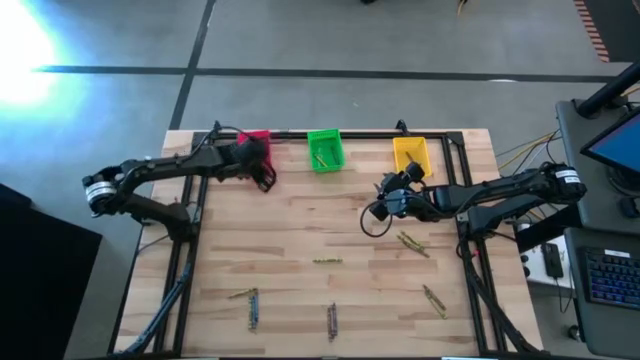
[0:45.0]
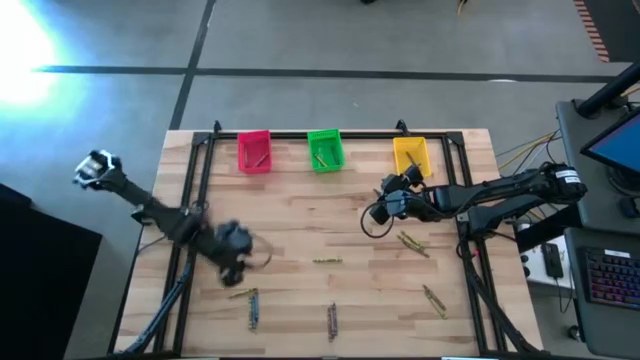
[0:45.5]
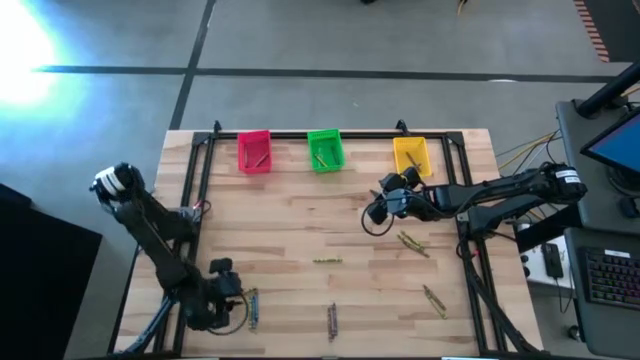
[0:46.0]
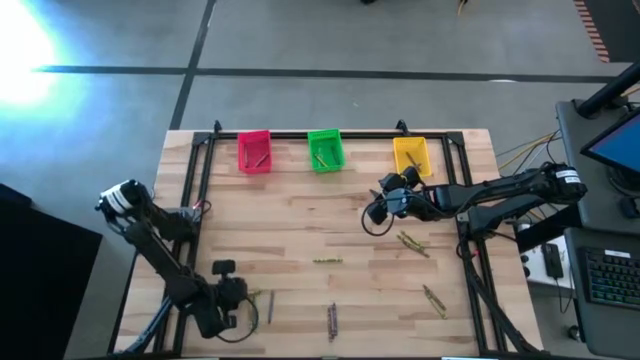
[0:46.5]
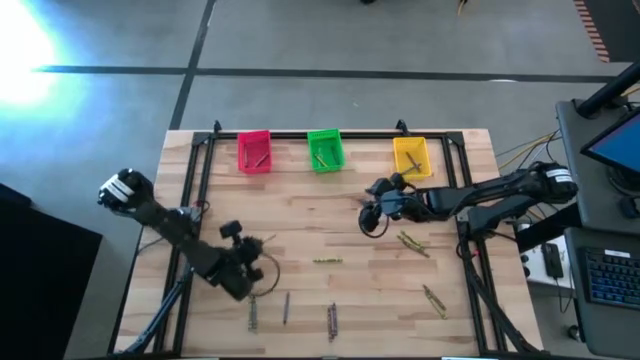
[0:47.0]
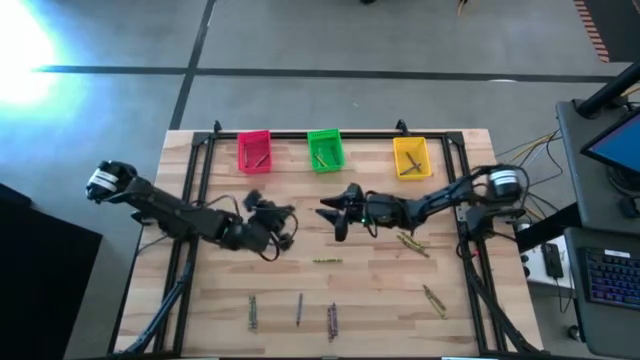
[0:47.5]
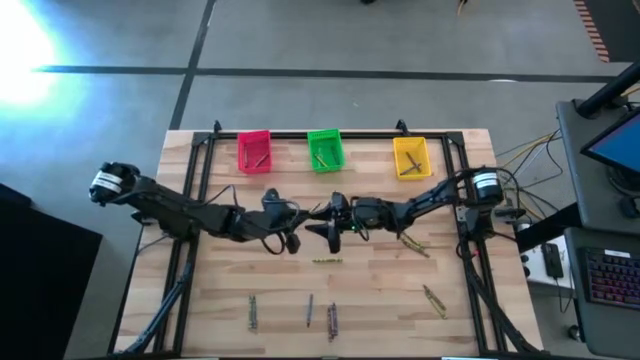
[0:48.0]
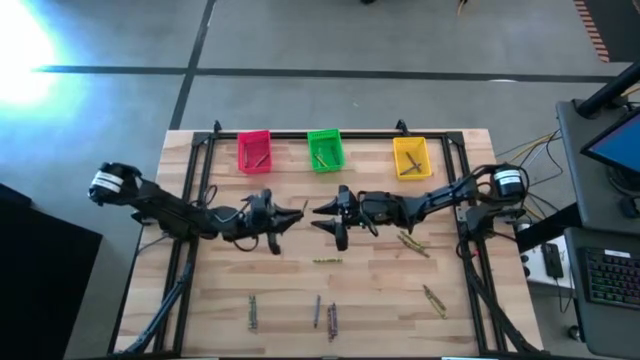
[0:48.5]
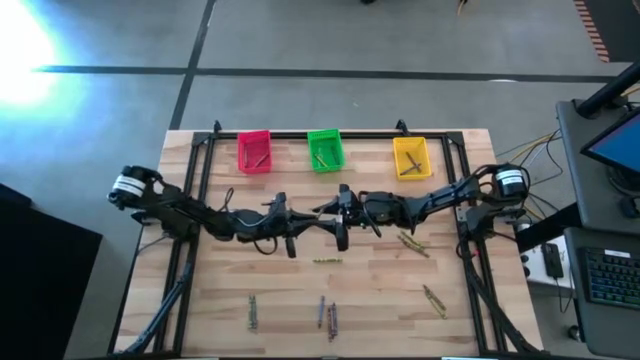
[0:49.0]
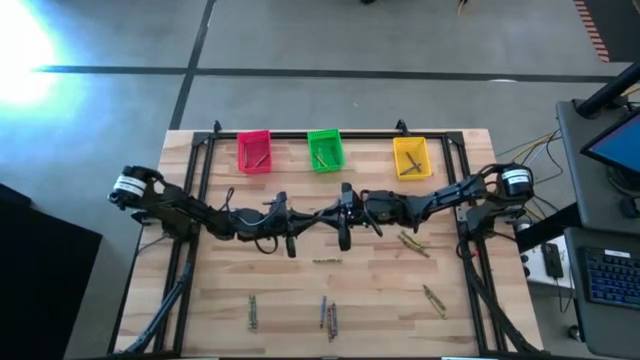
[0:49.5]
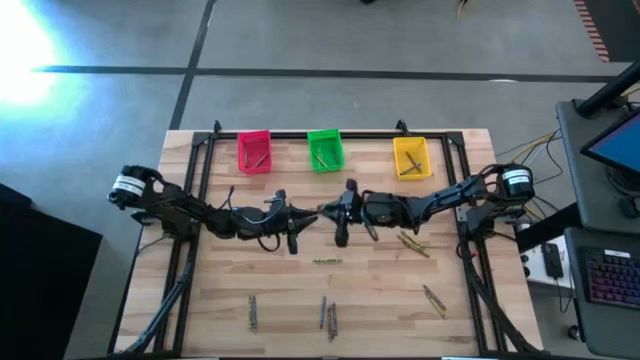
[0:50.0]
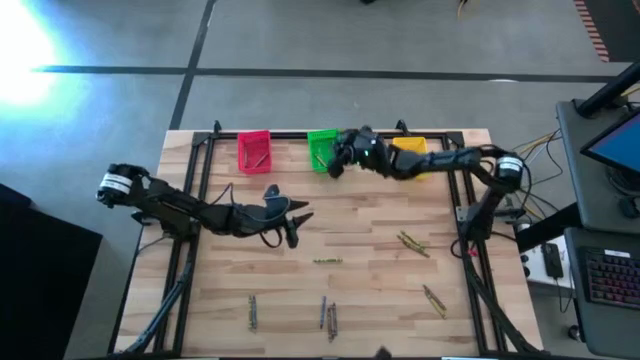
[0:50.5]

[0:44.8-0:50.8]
Task: Sort crayons
Put the green crayon into the green basket

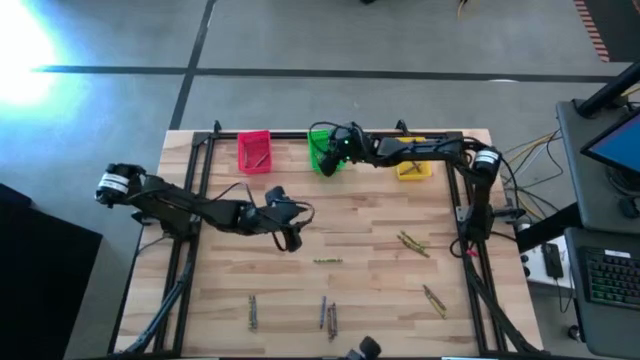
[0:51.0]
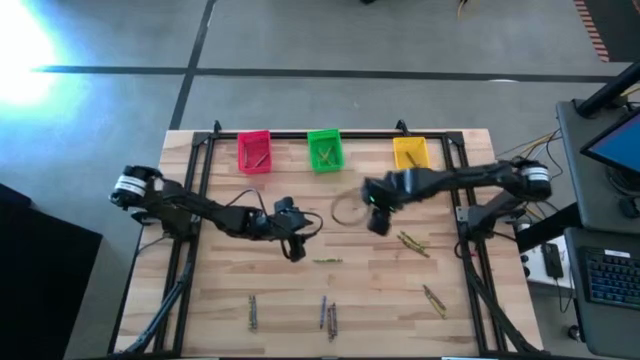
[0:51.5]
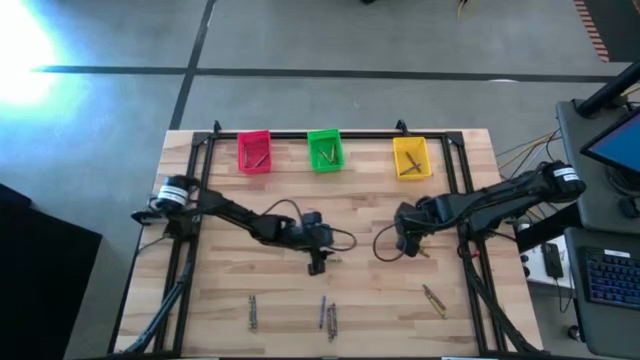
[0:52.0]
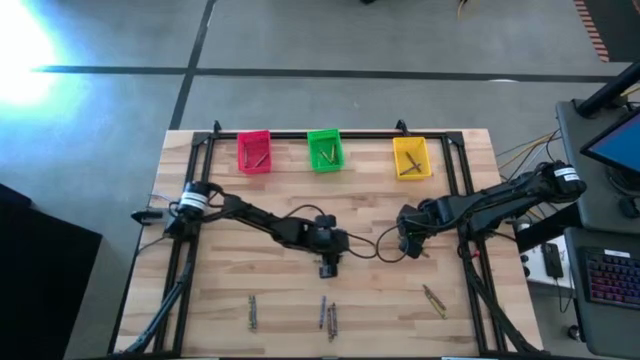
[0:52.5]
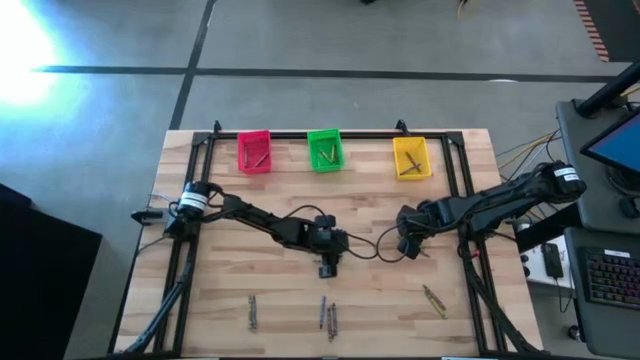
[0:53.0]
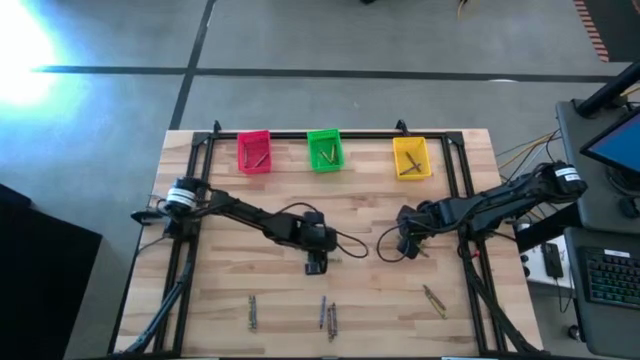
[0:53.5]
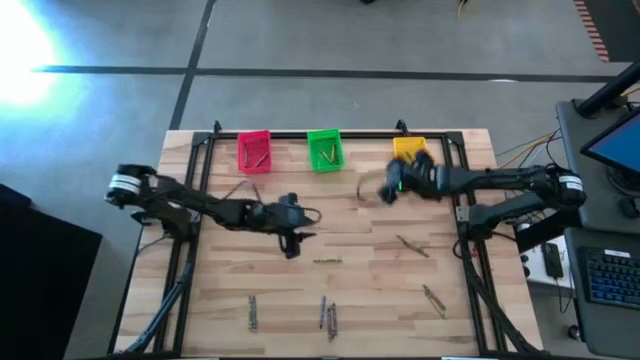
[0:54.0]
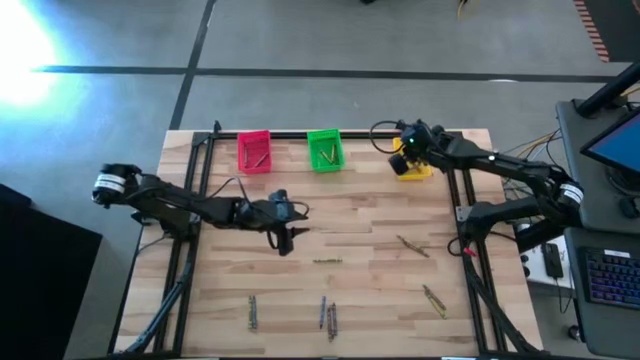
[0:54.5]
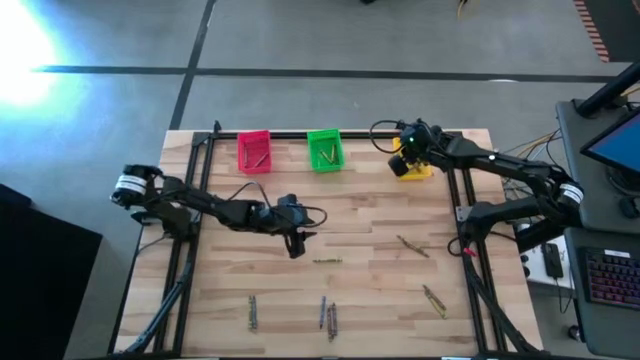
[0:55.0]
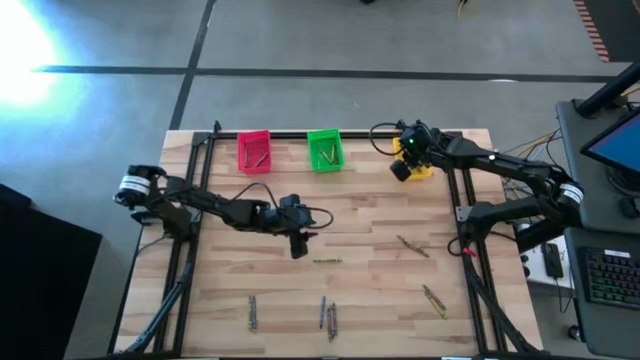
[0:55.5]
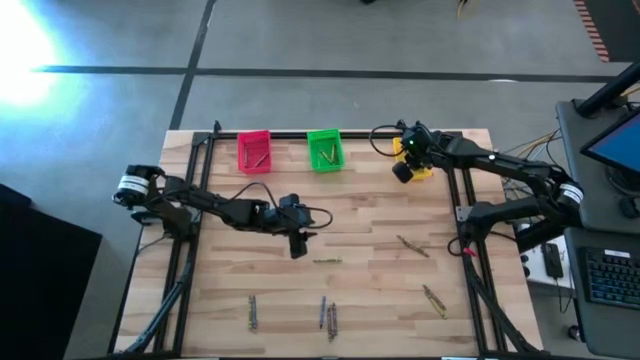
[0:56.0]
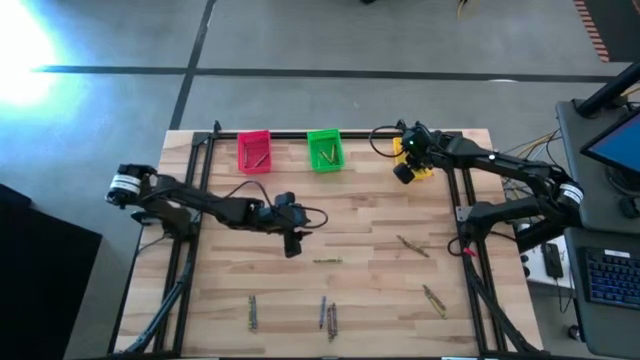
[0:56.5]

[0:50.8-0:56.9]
Put the green crayon into the yellow basket

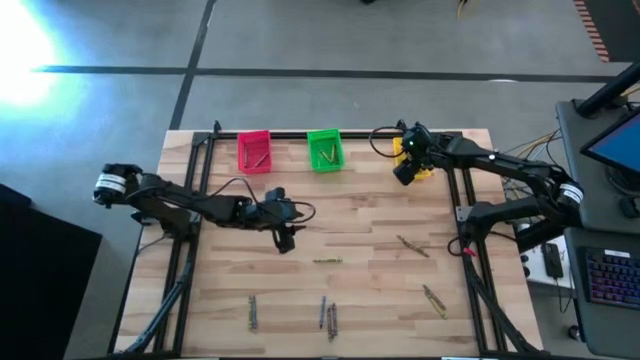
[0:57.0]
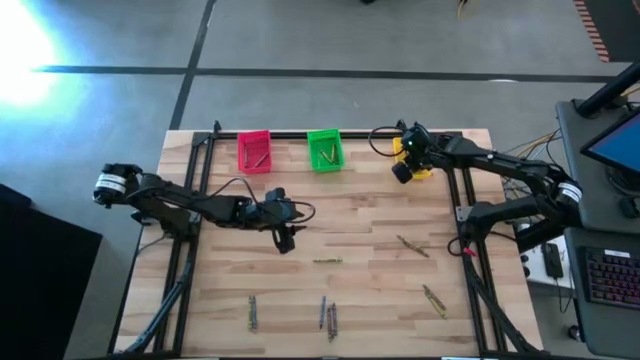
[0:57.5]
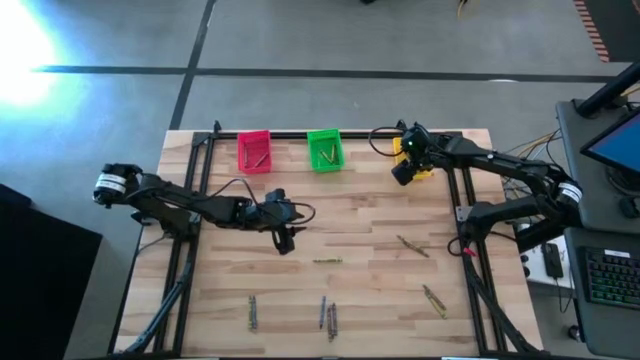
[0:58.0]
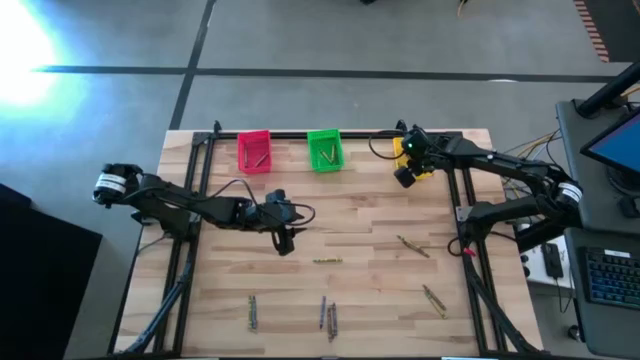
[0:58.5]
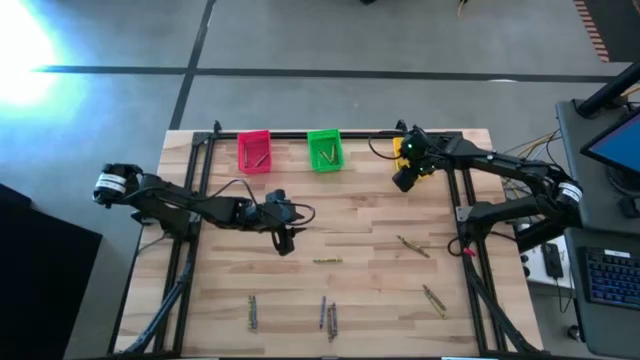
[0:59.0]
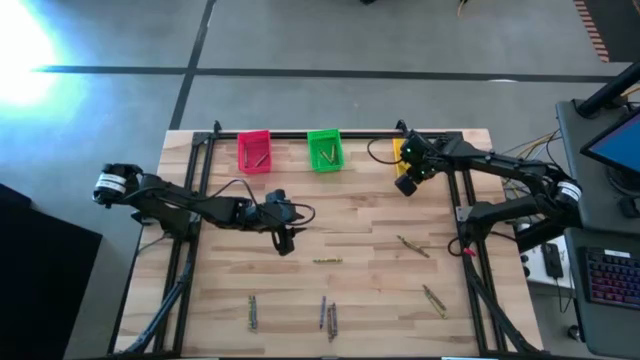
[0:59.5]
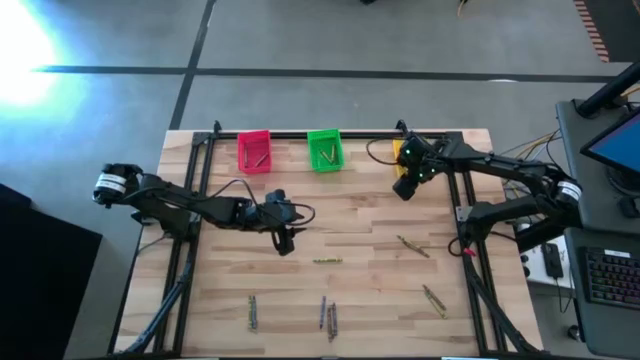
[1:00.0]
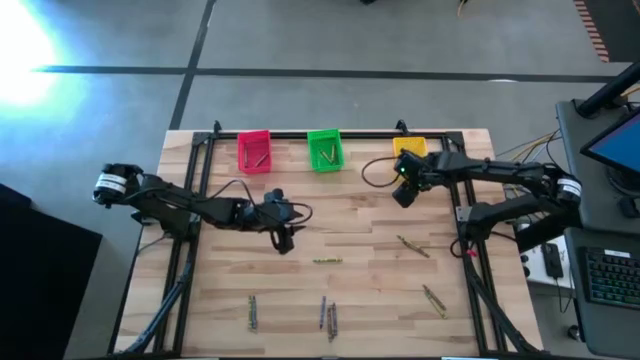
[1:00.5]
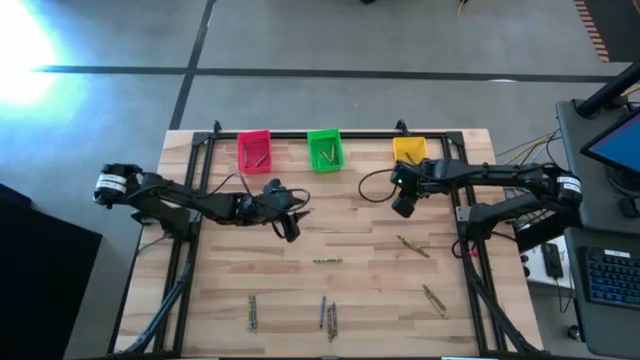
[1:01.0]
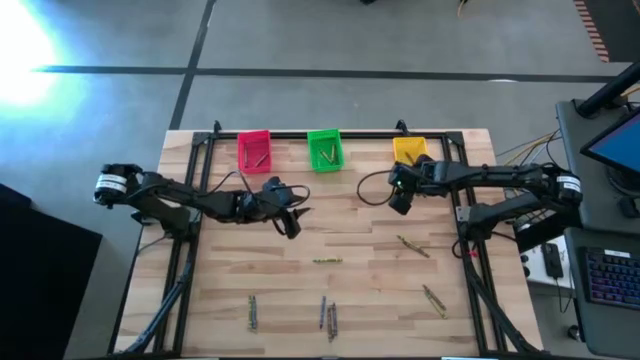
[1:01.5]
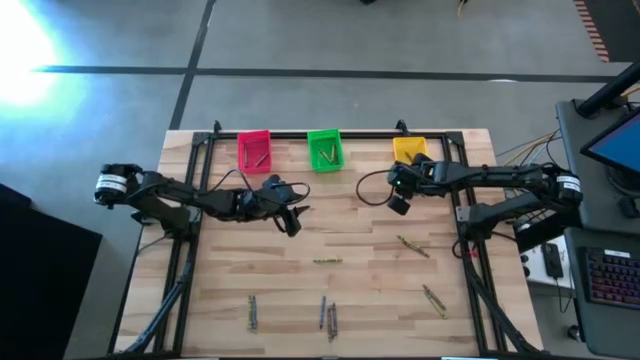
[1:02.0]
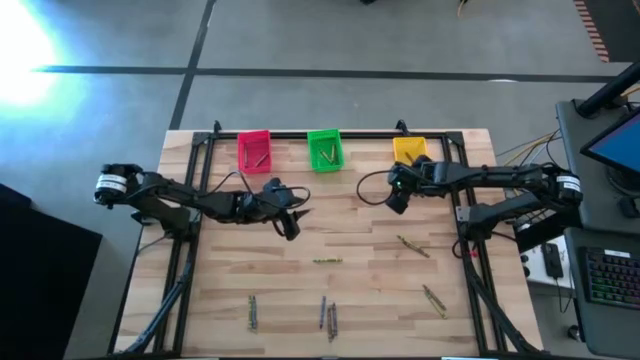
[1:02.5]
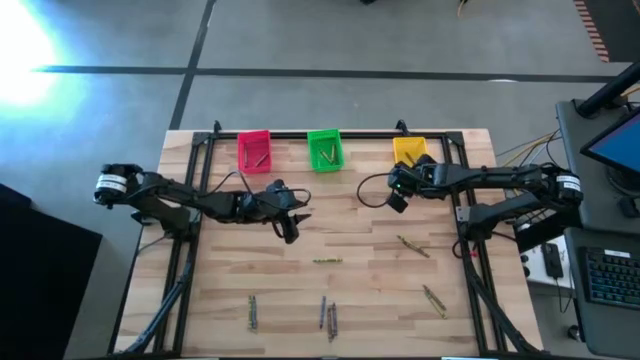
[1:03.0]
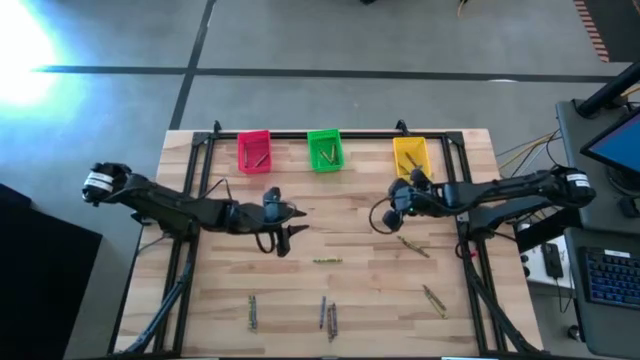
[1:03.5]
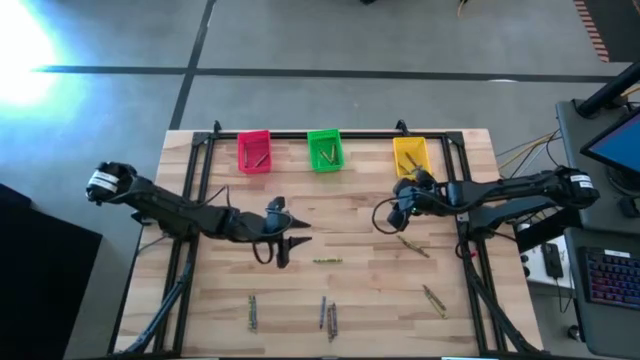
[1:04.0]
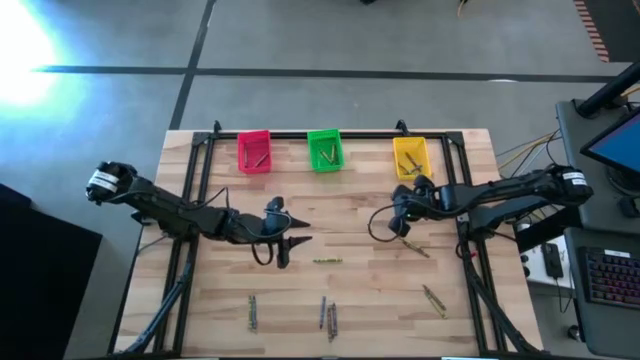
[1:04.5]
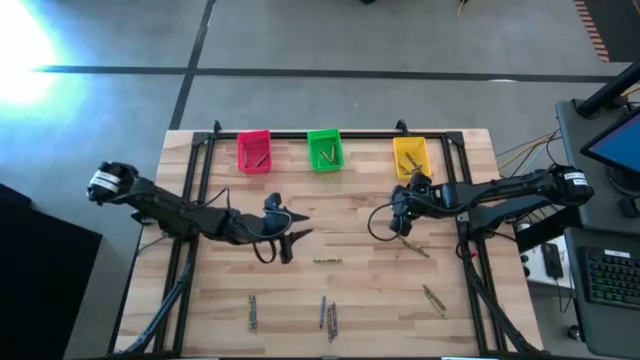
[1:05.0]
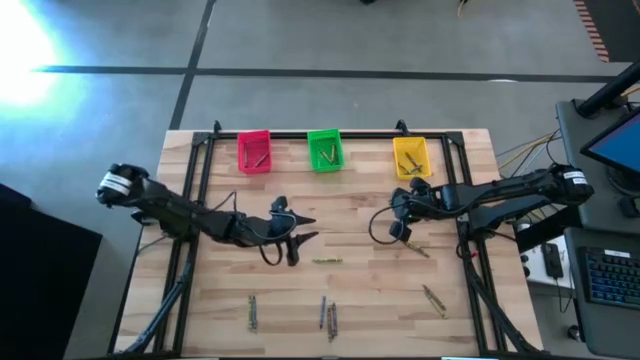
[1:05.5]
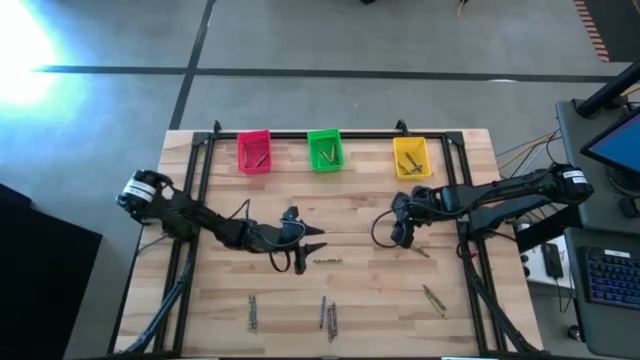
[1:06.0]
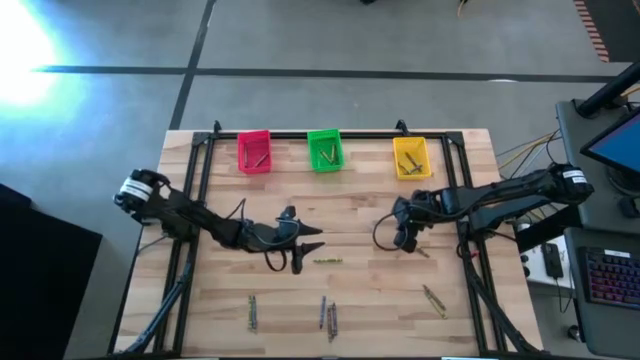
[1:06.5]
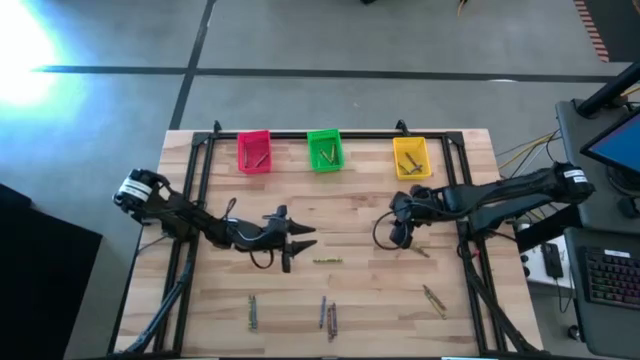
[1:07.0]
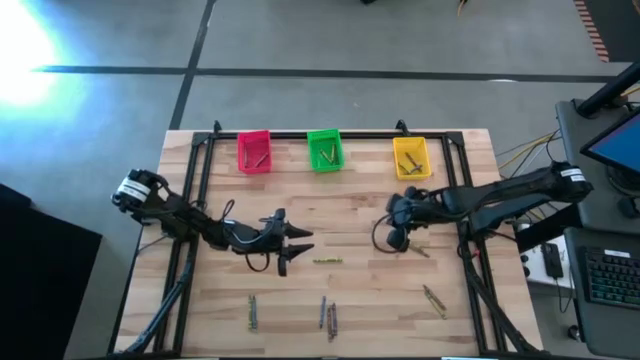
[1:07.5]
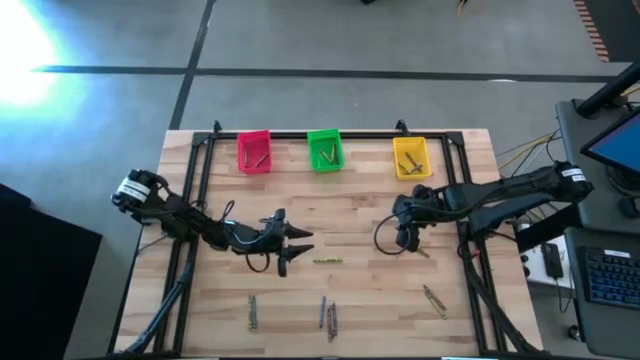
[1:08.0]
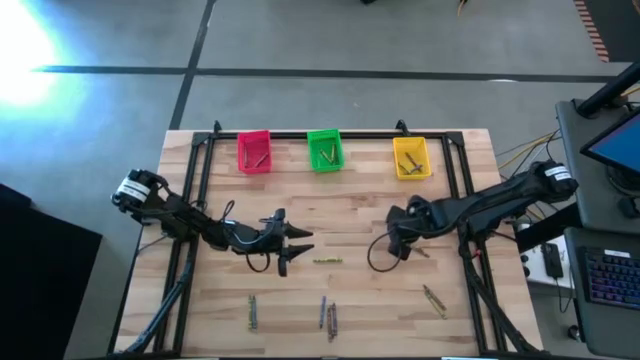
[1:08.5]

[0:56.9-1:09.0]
Put the green crayon into the yellow basket
